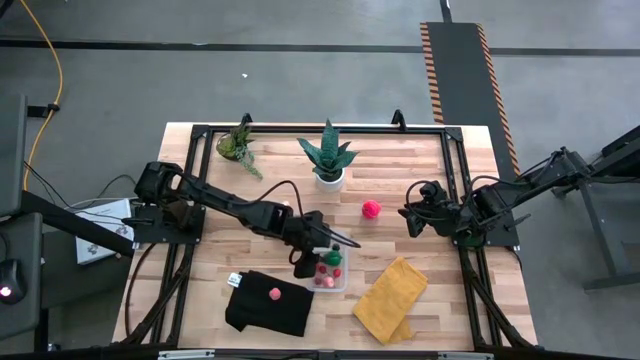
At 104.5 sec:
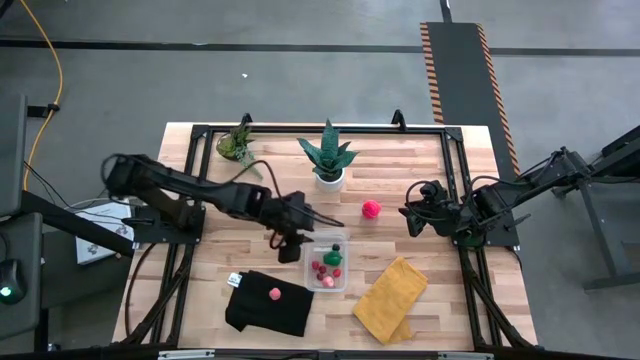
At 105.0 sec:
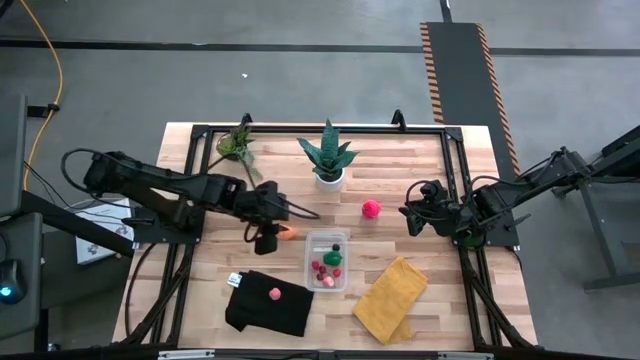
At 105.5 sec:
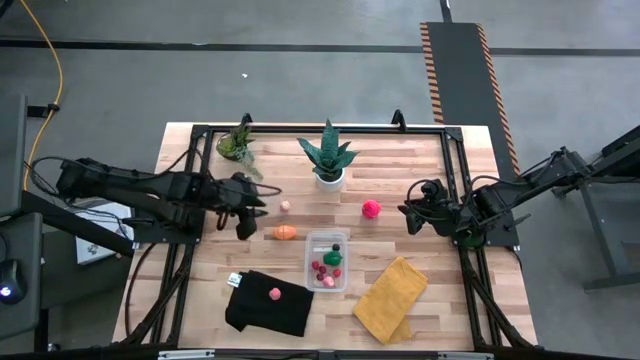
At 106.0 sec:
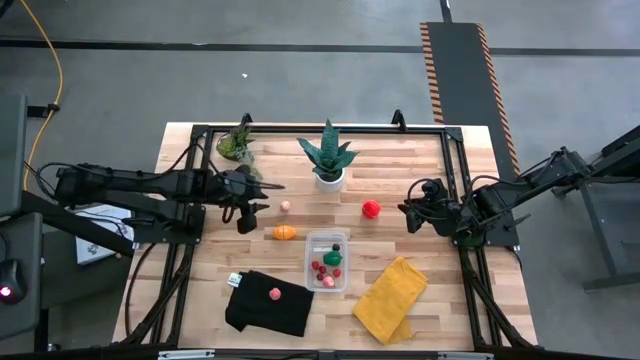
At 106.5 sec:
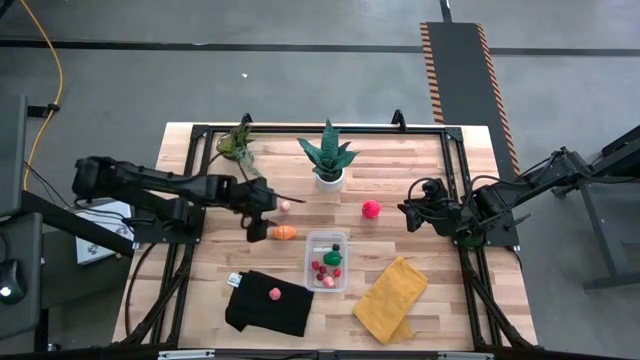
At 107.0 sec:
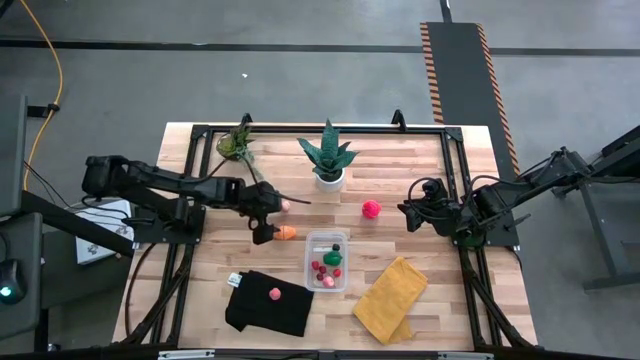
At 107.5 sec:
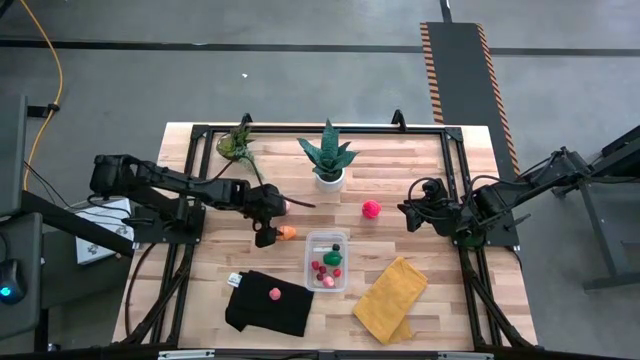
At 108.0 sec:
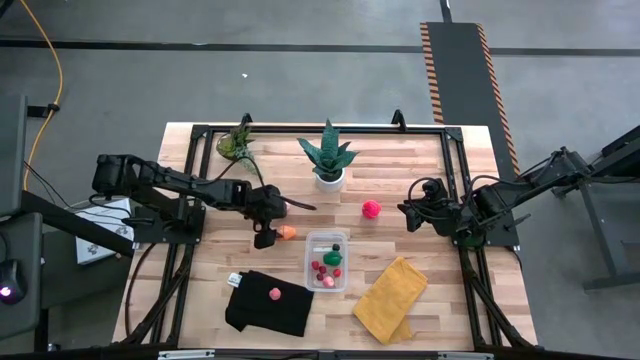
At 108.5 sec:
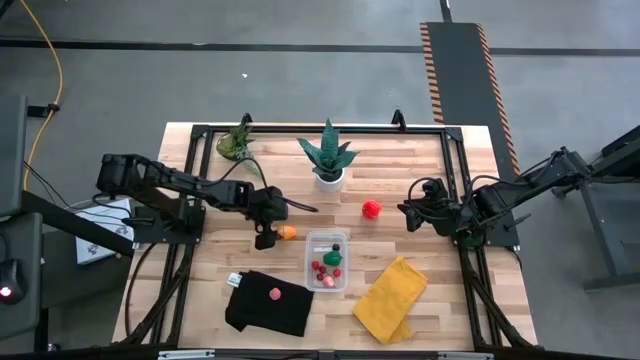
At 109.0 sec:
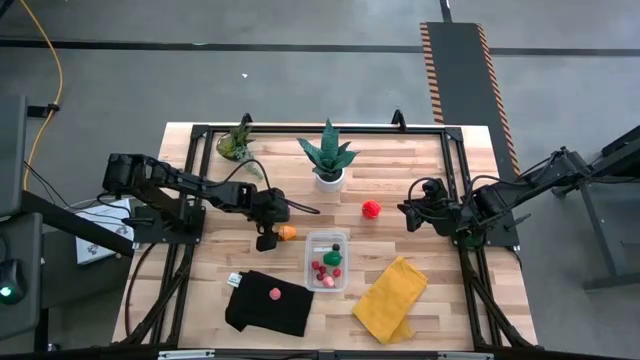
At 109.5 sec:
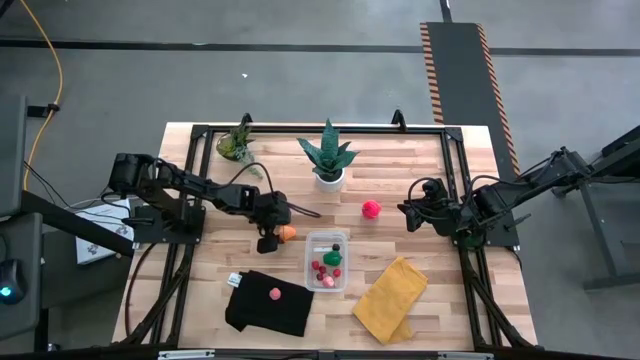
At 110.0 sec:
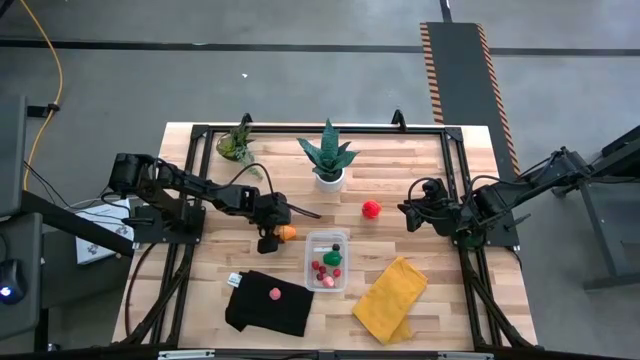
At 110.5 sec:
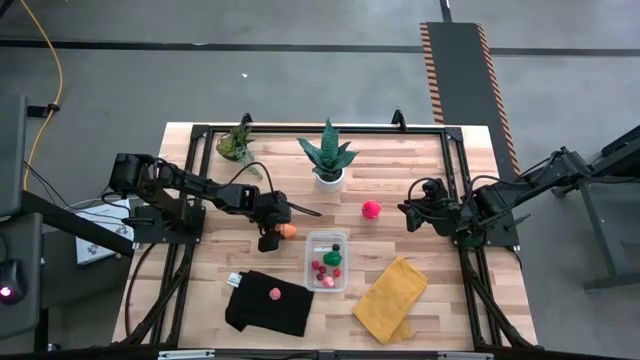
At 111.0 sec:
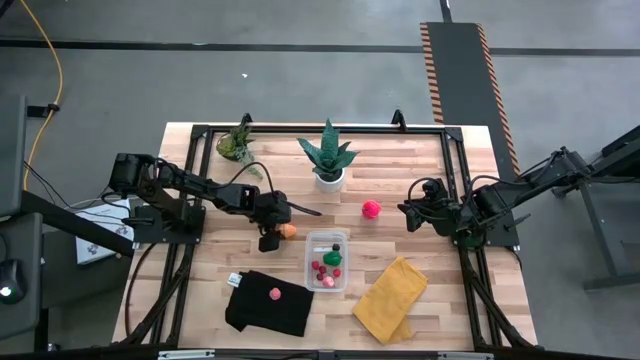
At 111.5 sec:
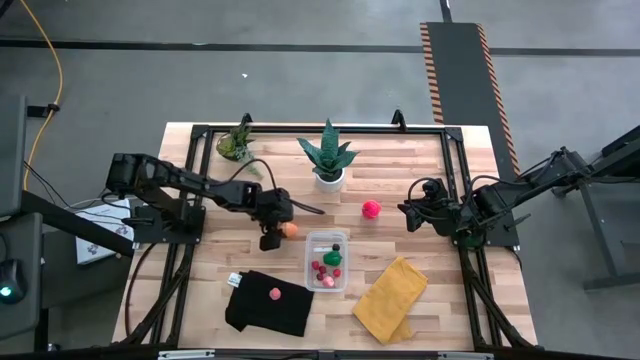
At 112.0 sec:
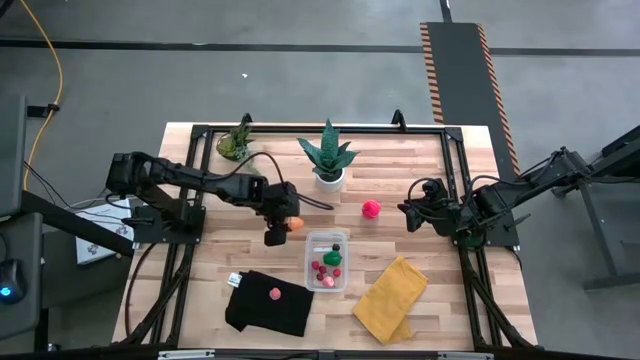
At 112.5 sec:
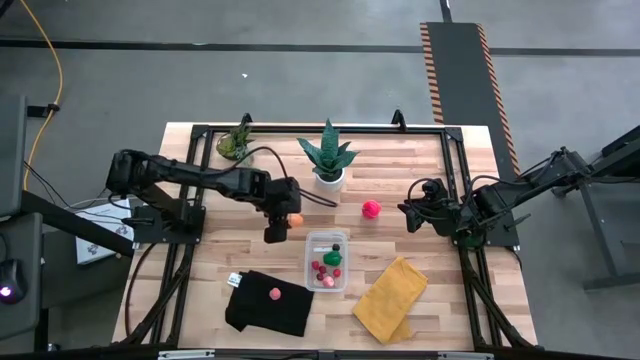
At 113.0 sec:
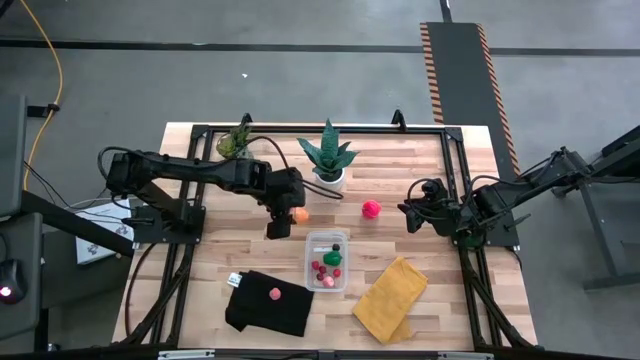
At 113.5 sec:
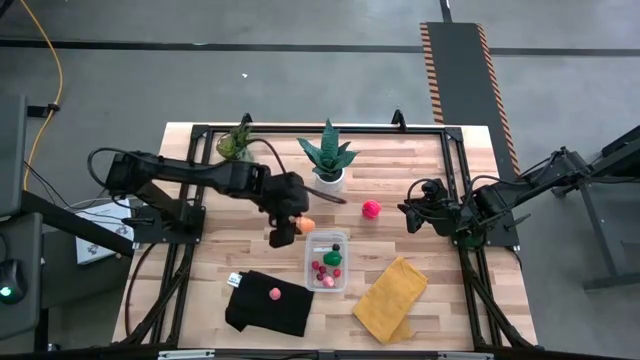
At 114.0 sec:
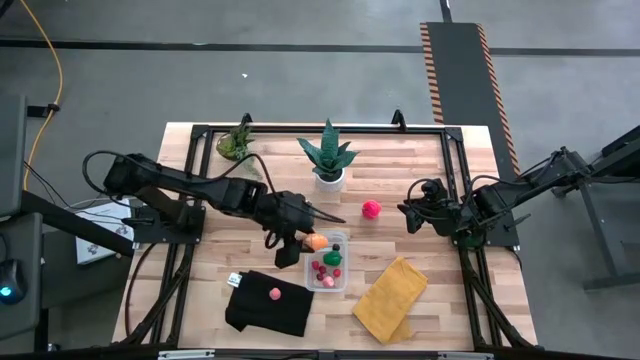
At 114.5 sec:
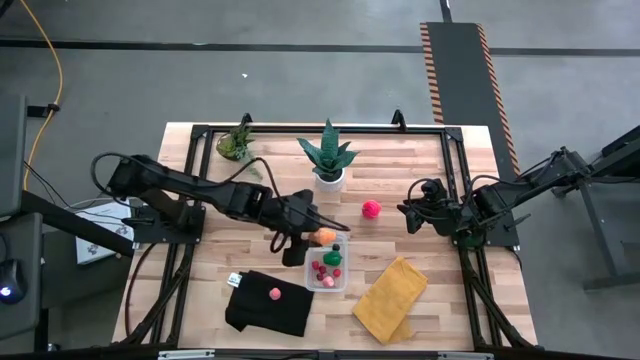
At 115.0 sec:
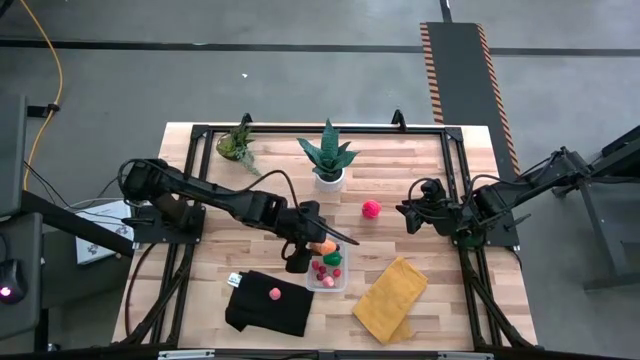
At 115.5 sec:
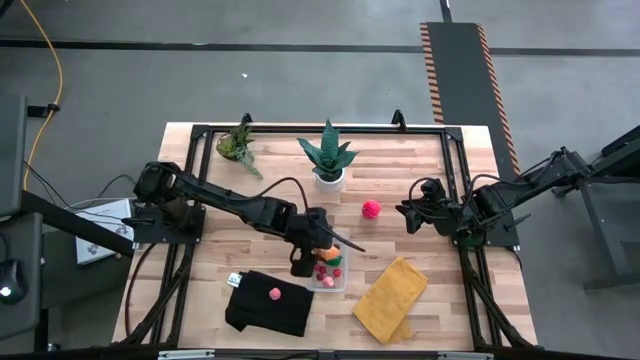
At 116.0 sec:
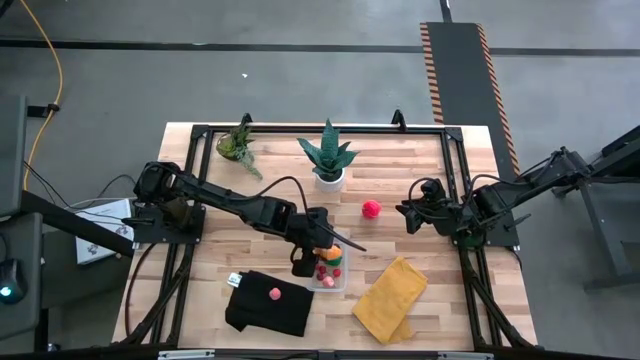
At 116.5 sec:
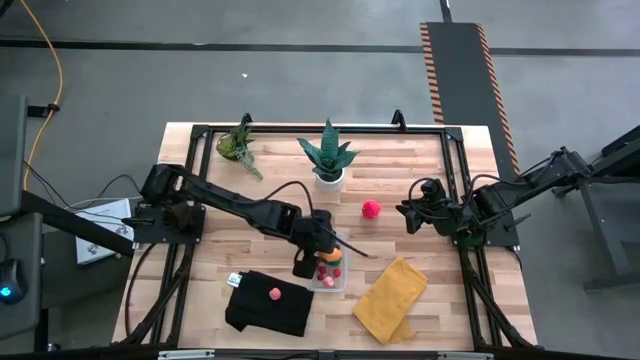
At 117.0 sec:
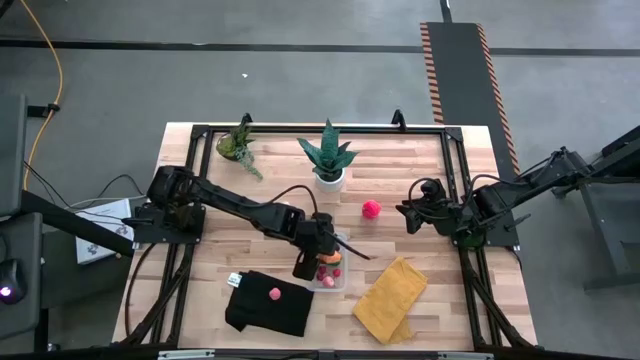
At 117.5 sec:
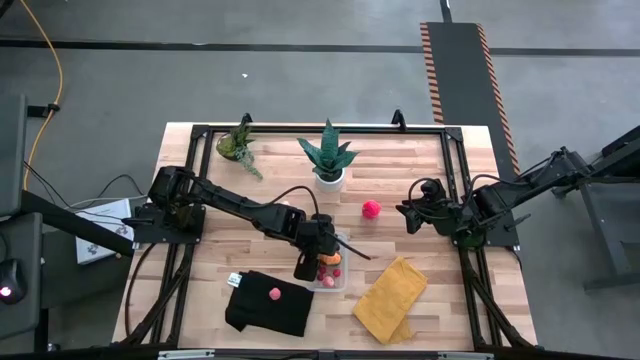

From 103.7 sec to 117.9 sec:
Task: Pick and placing Produce into tupperware
Put the croissant into the transparent container

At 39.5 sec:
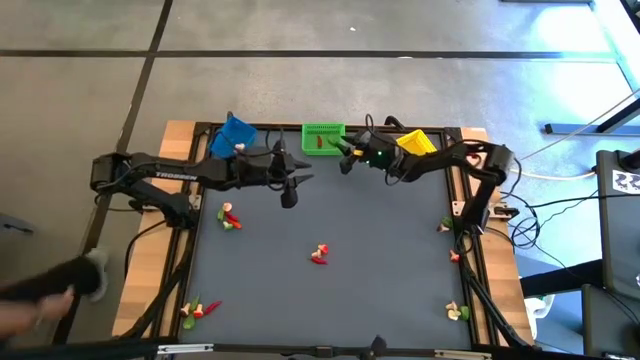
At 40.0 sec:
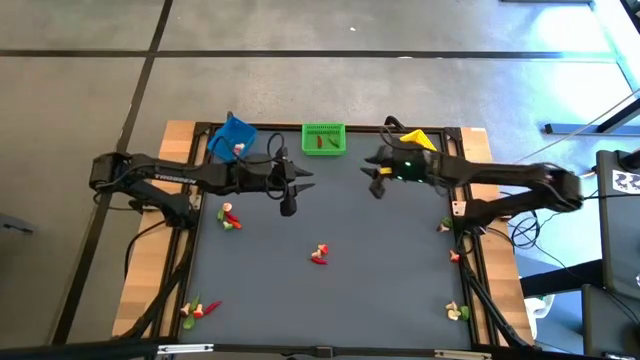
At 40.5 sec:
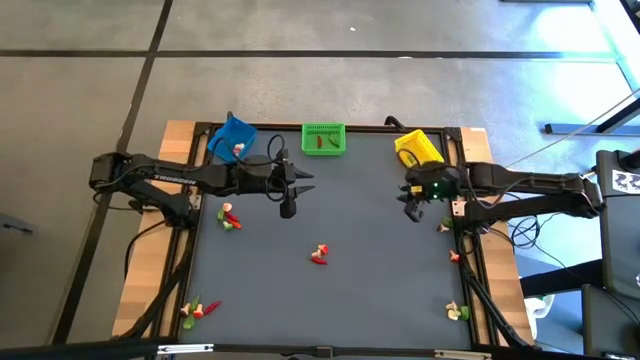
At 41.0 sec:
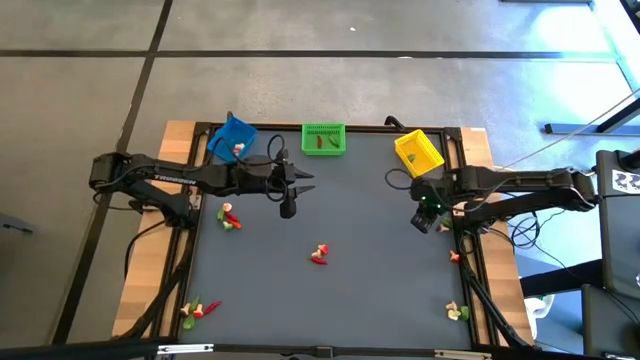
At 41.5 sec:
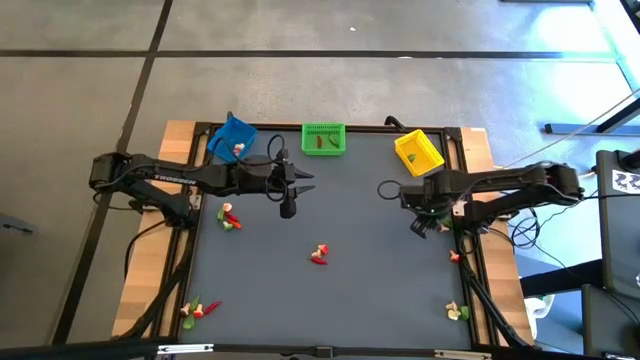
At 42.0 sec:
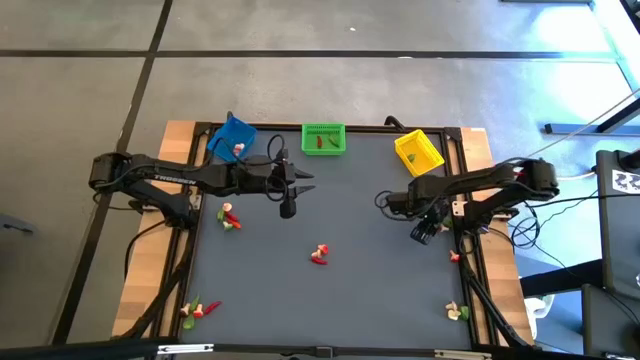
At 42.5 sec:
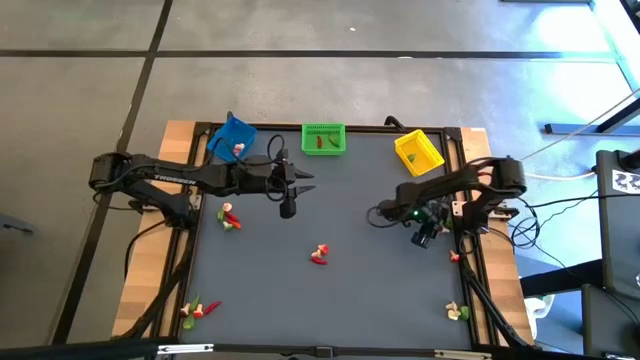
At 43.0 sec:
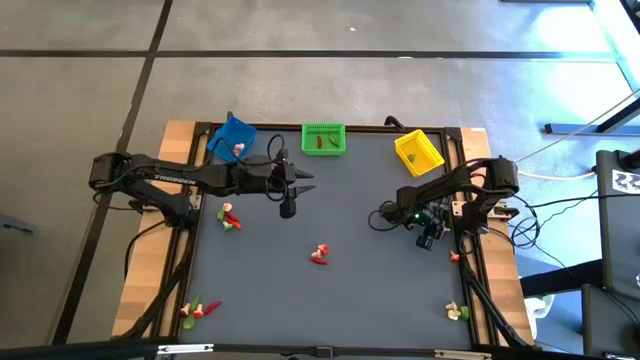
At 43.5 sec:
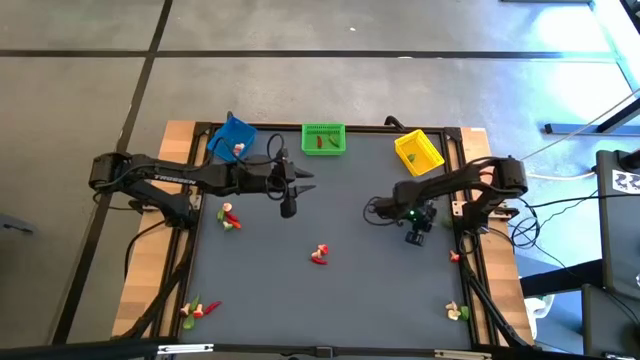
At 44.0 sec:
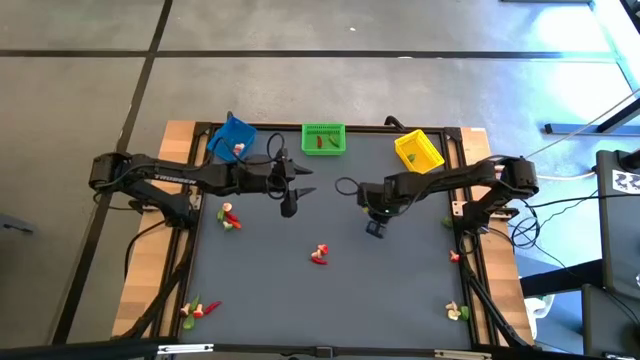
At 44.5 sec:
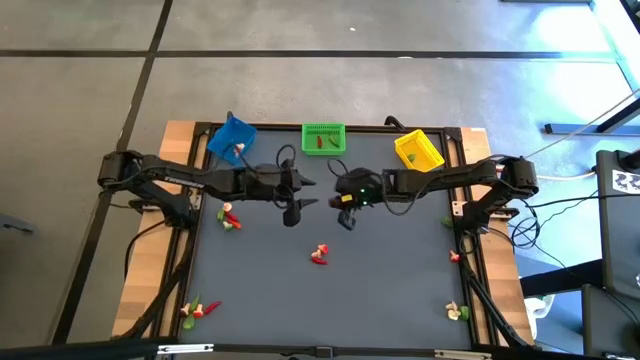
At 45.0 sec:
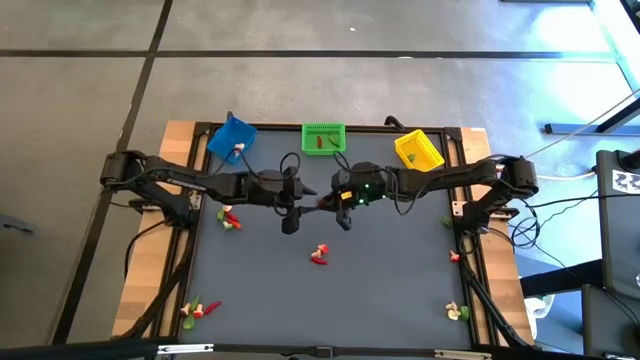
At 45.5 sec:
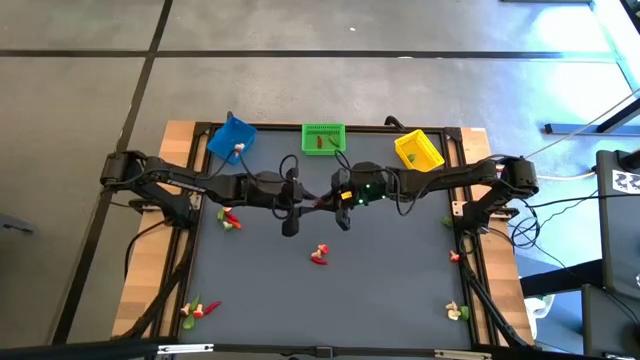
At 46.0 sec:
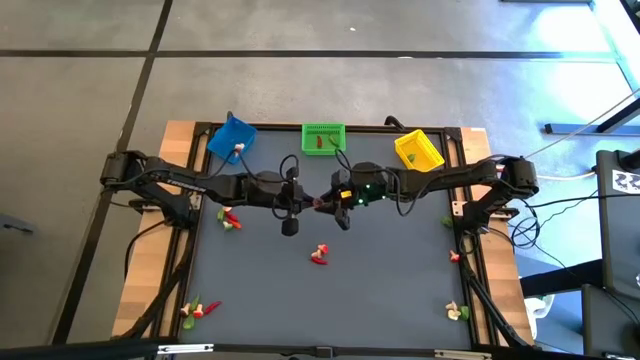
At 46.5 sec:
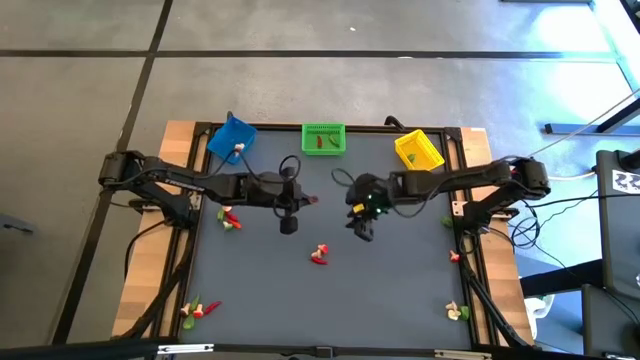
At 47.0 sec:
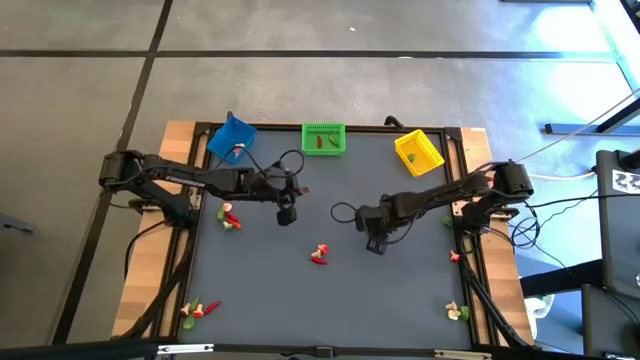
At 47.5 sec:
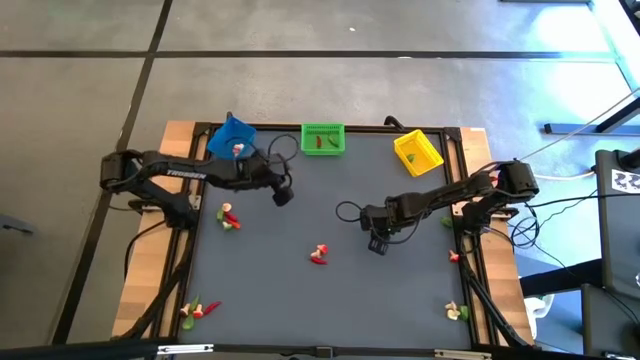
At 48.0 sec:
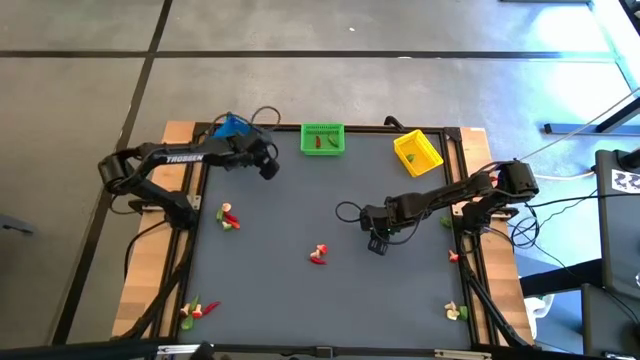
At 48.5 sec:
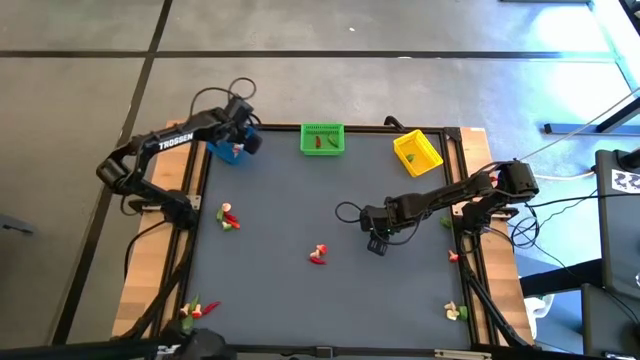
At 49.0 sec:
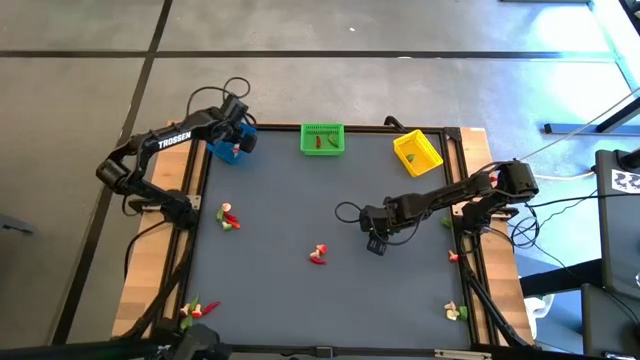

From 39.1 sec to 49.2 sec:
Task: Sort produce into baskets
Put the brown mushroom into the blue bin
